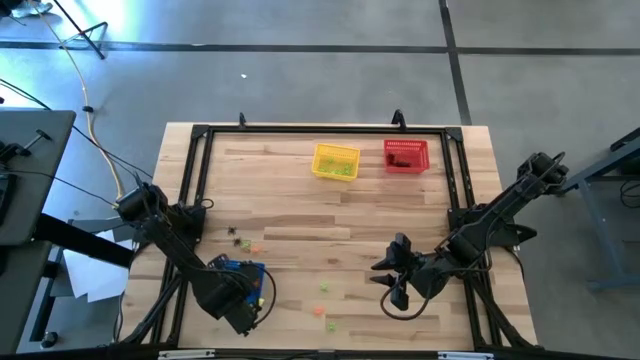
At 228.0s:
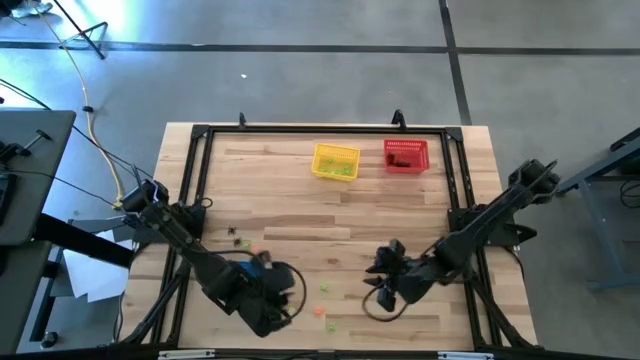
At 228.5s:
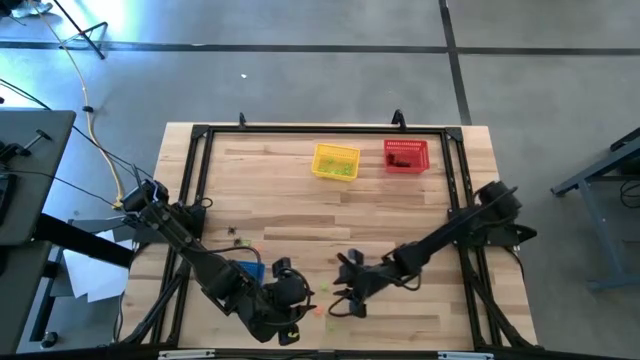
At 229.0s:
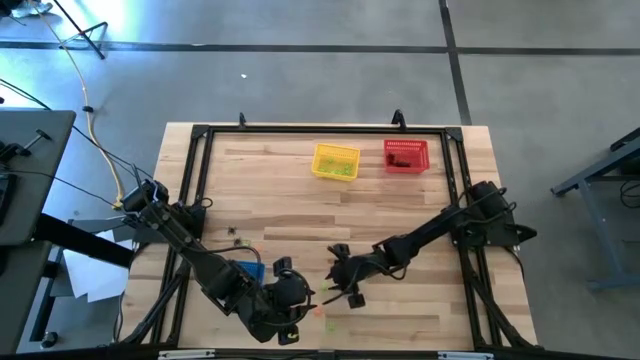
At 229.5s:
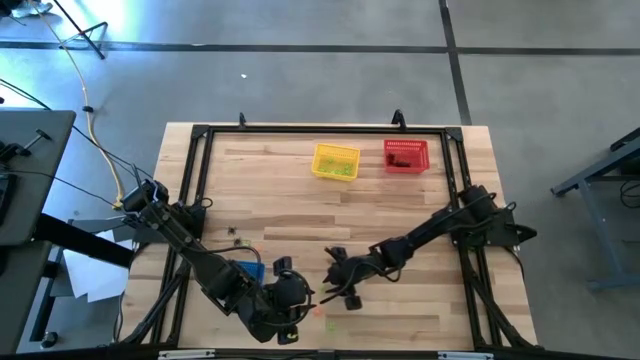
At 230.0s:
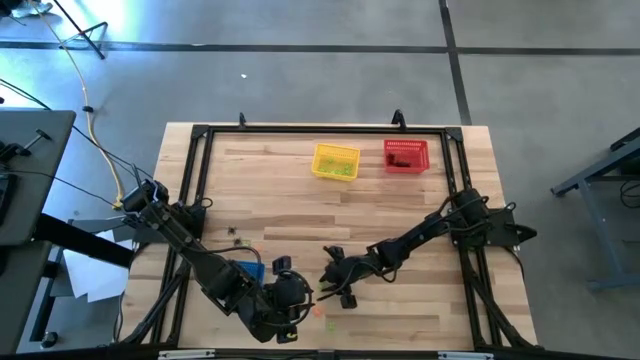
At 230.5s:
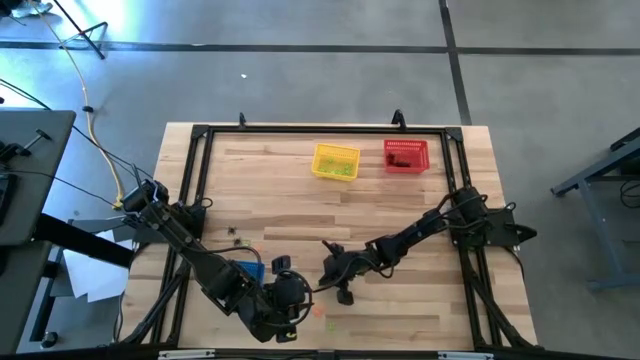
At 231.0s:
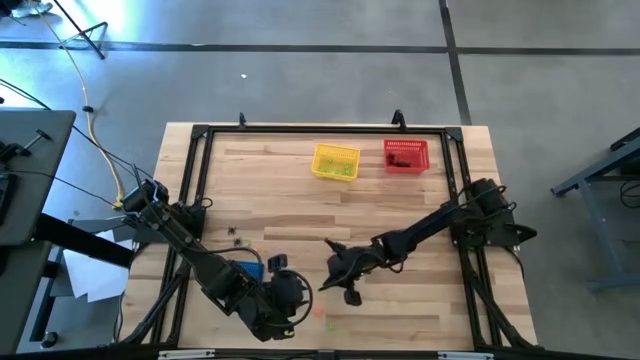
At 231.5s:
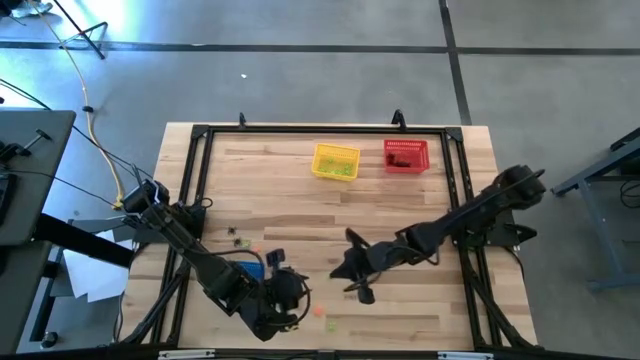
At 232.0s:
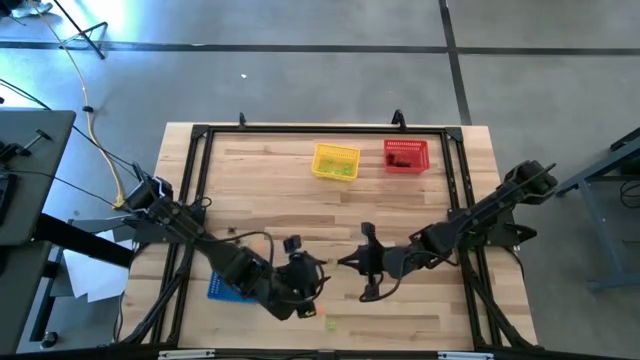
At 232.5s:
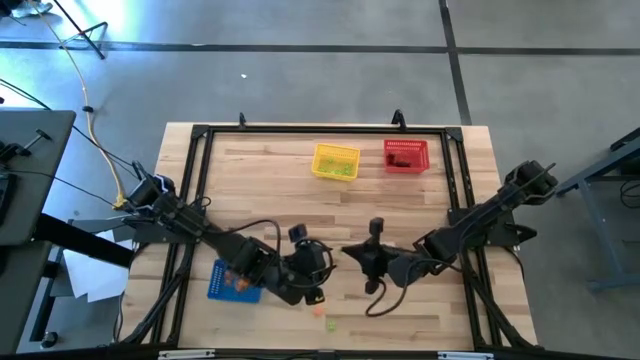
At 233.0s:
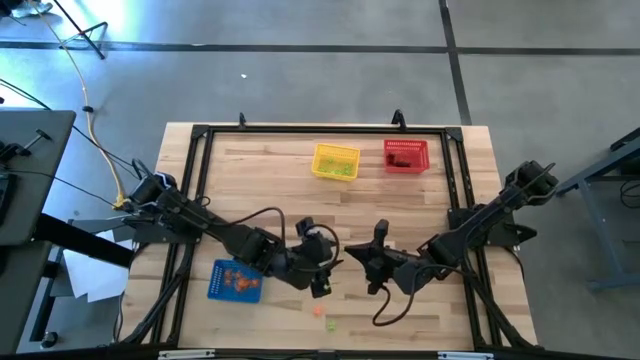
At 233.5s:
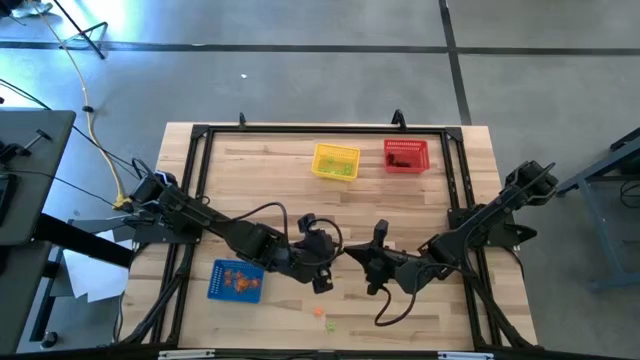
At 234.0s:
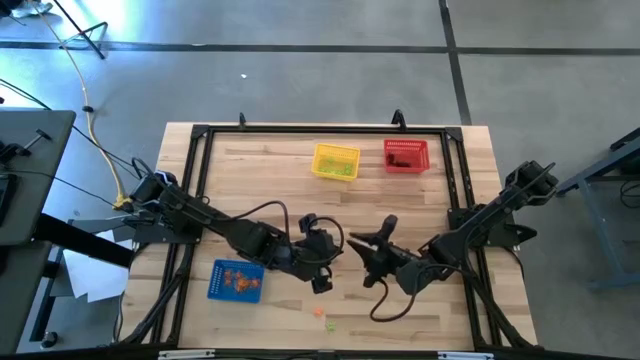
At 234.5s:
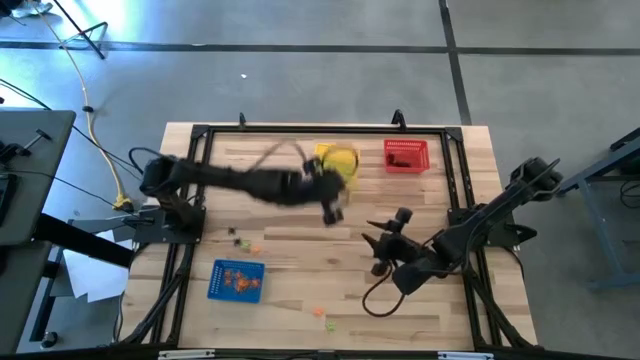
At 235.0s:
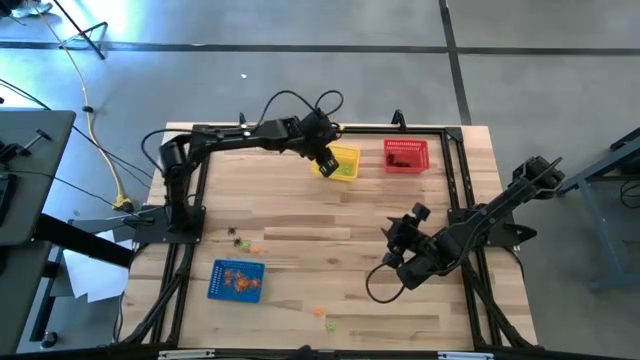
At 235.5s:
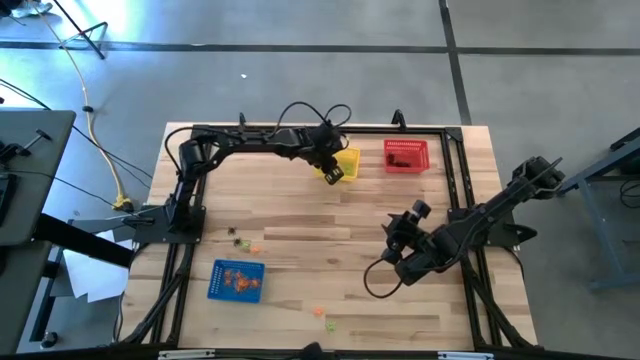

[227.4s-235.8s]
Task: Sort Halloween decoration
Put the green spider toy into the yellow bin

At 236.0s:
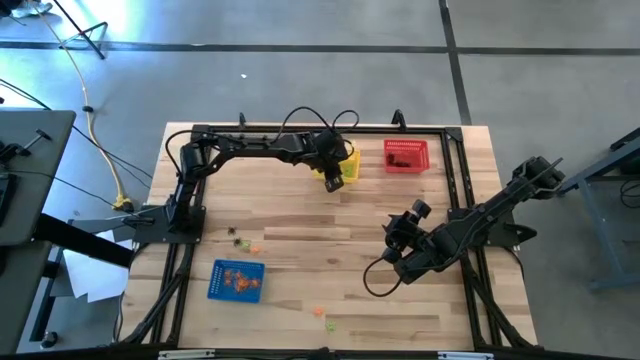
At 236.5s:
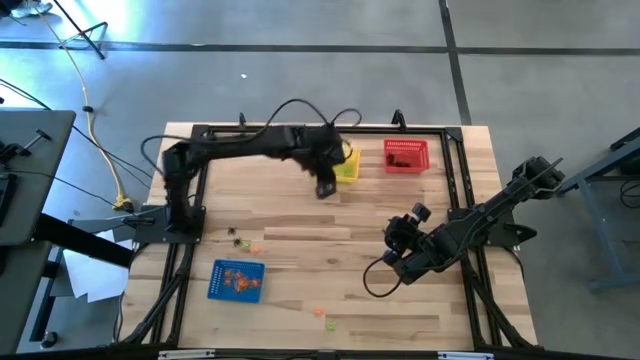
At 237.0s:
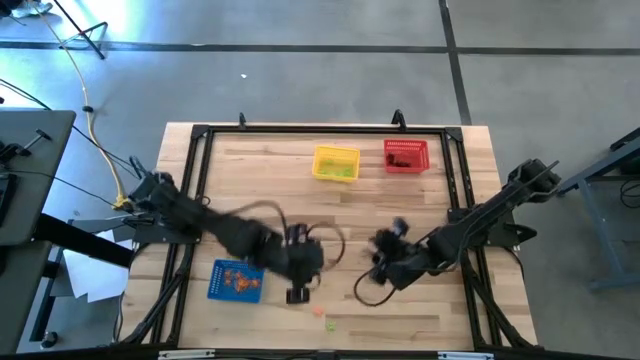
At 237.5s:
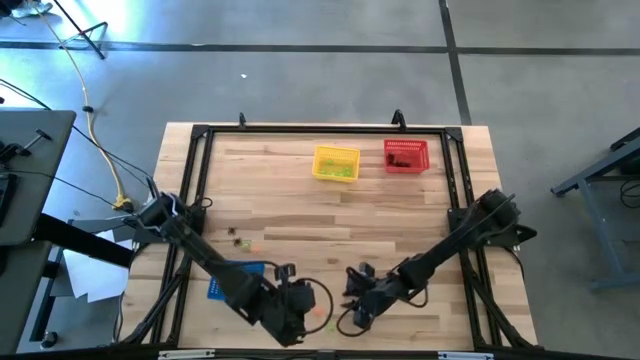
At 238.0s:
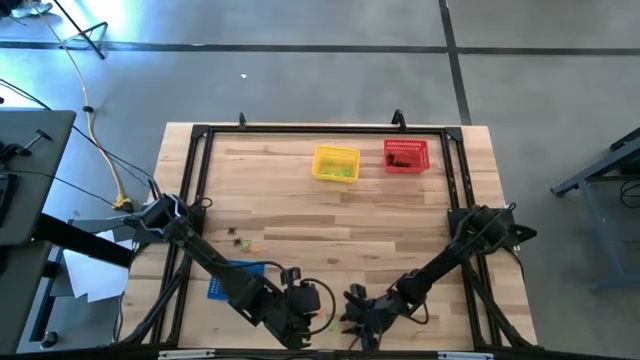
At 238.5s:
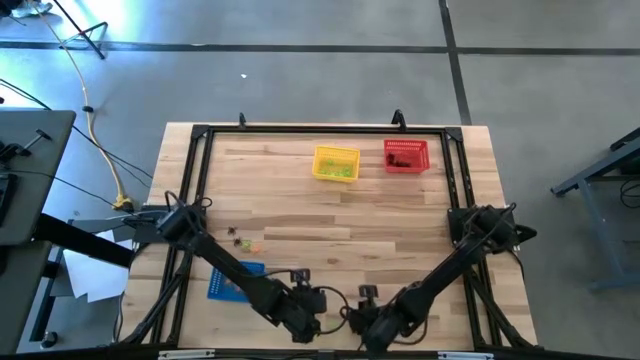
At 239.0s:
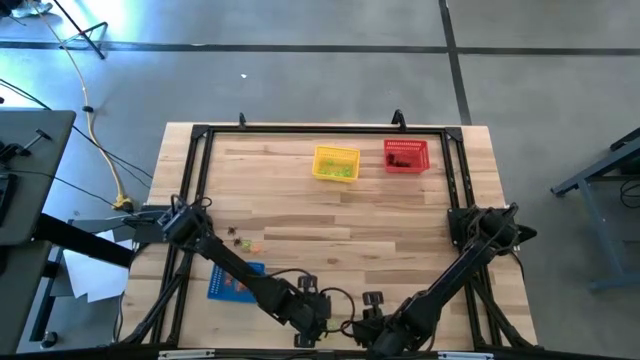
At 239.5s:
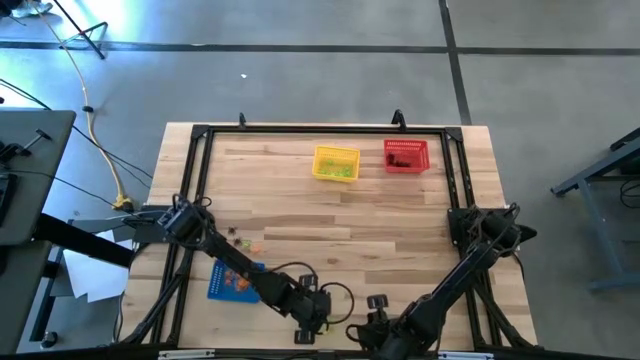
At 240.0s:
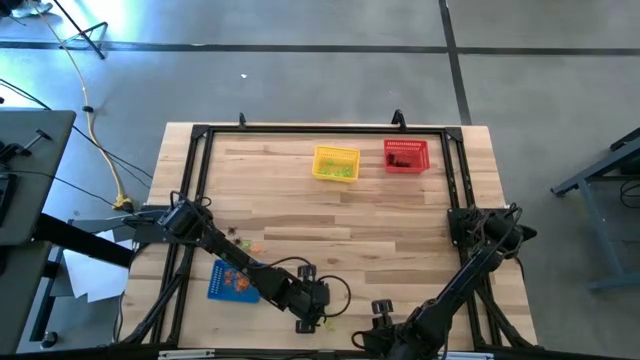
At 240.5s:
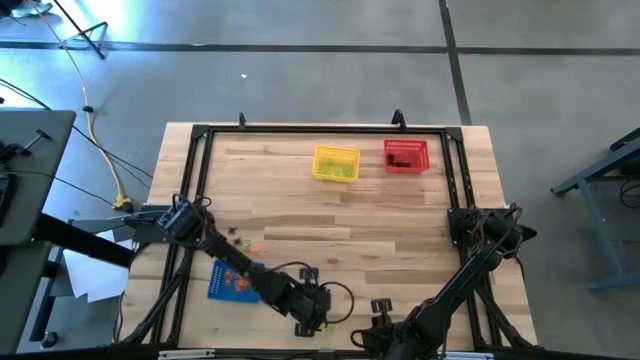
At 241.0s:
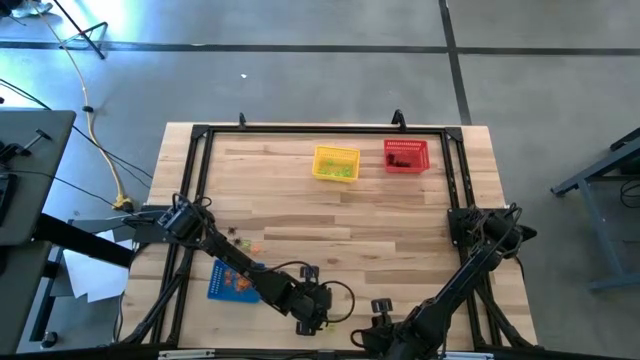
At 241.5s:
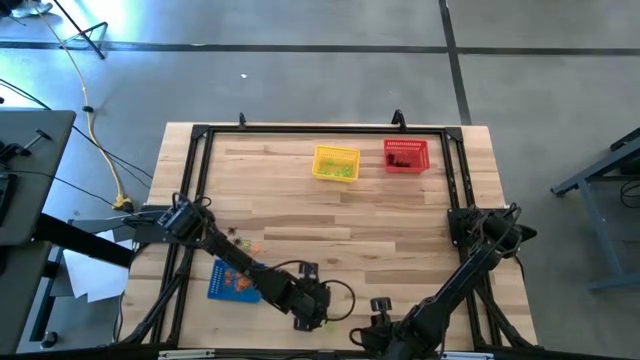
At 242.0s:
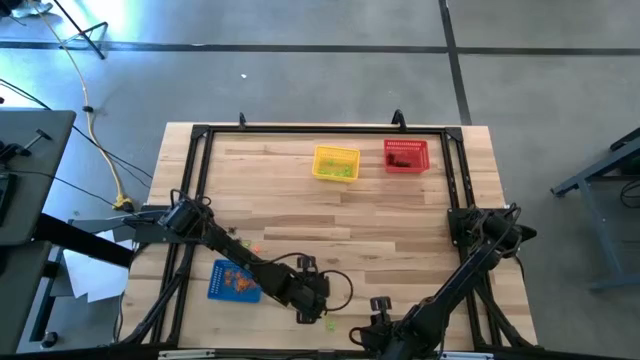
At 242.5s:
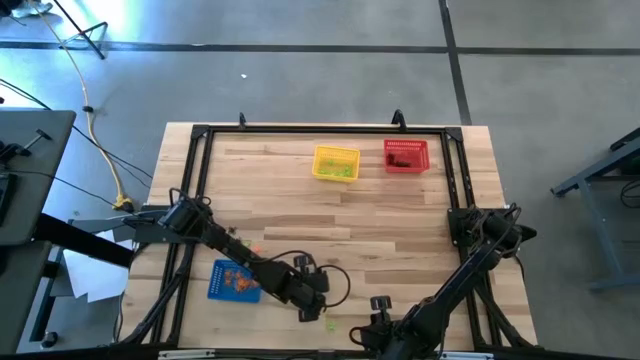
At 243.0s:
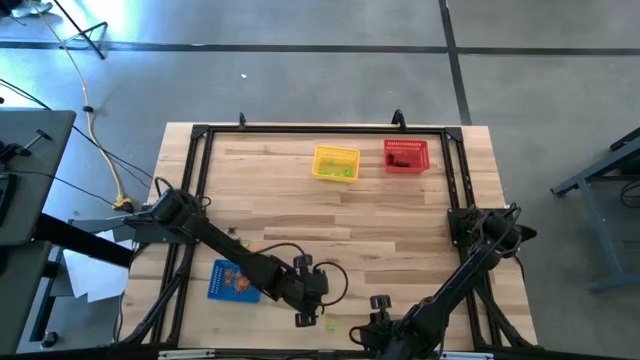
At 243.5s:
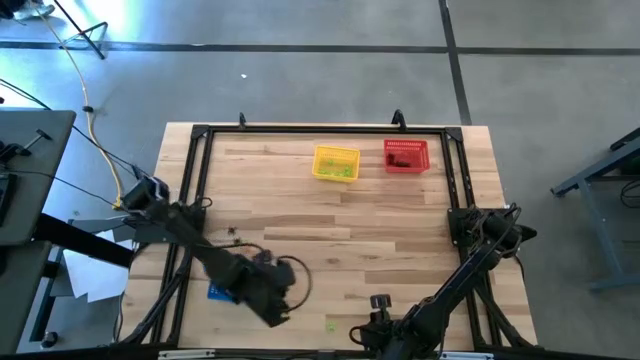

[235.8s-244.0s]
Put the orange spider toy into the blue bin

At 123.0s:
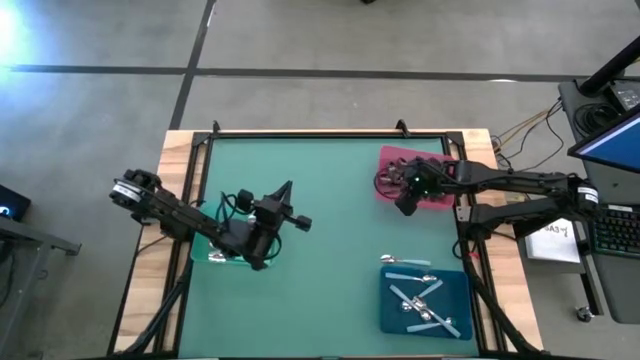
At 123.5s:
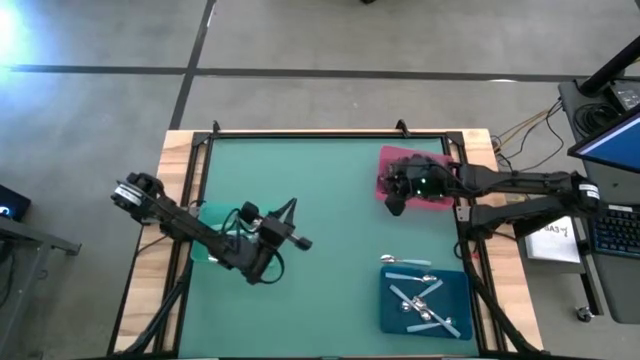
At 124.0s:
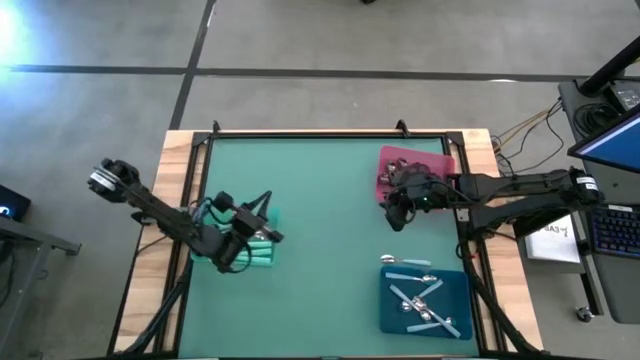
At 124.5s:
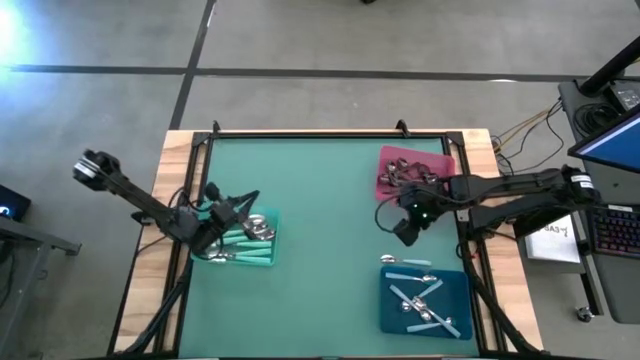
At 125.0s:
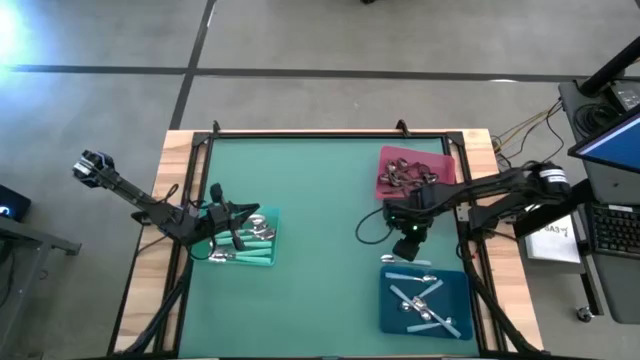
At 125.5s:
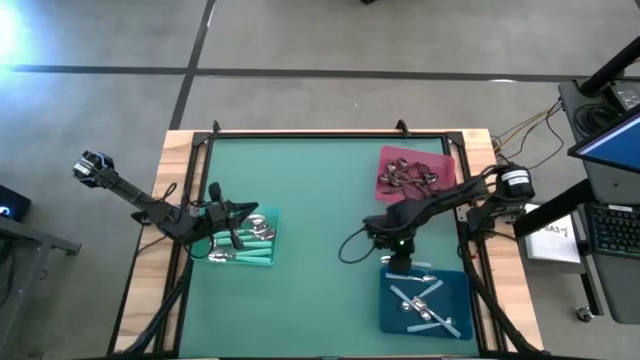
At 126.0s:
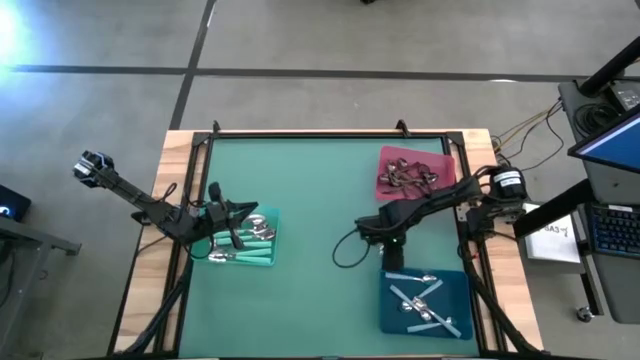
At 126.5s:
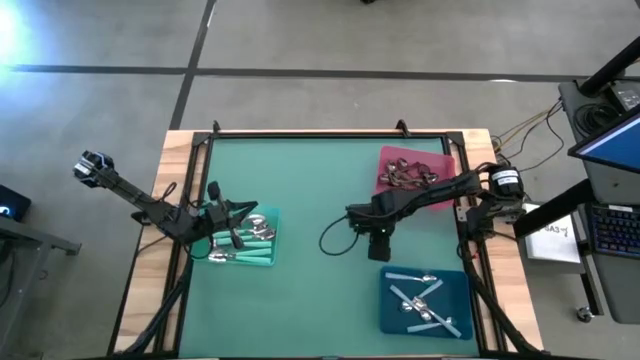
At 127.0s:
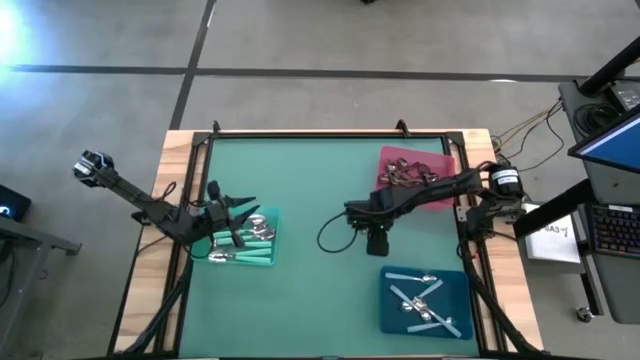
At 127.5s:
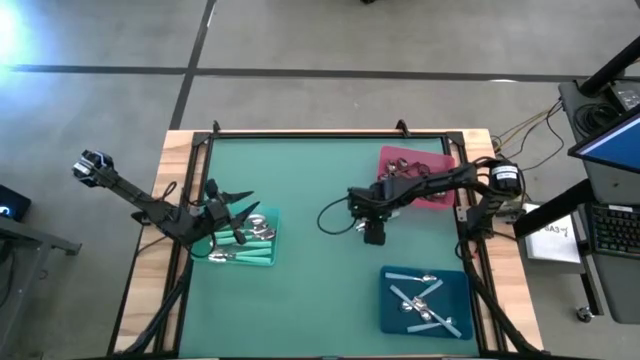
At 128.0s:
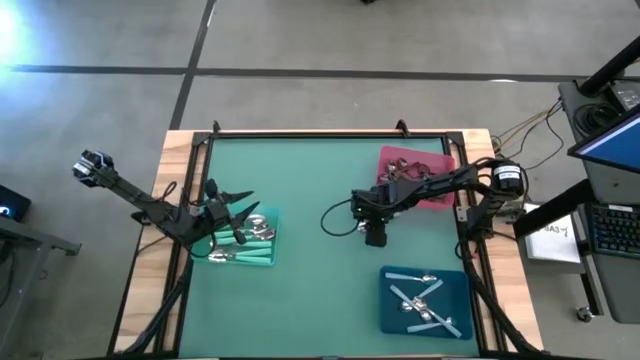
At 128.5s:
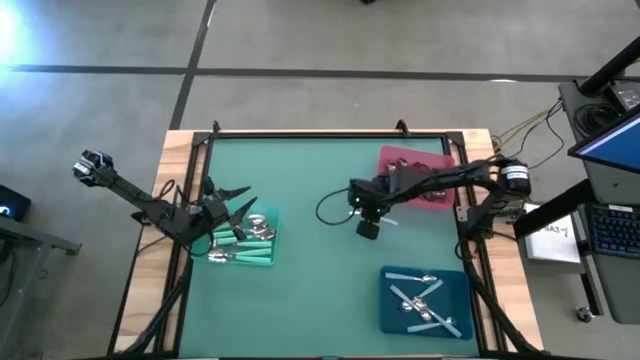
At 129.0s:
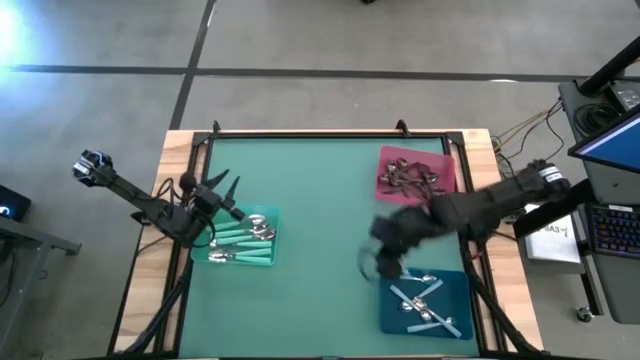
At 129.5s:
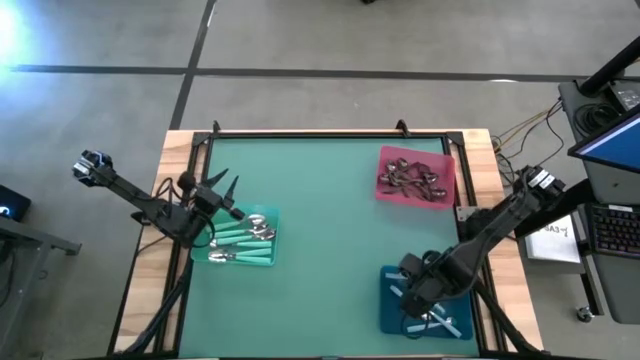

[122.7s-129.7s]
Task: Sort silverware by color (type)
Put the blue spoon into the blue bin
